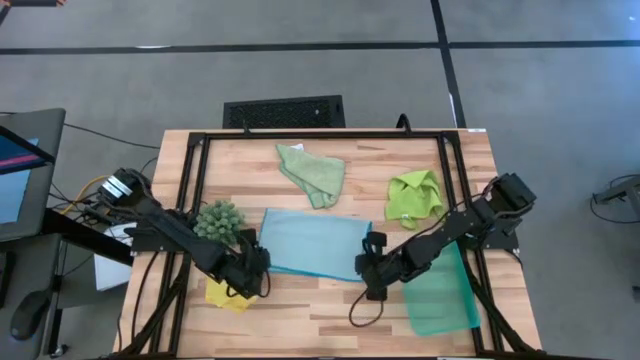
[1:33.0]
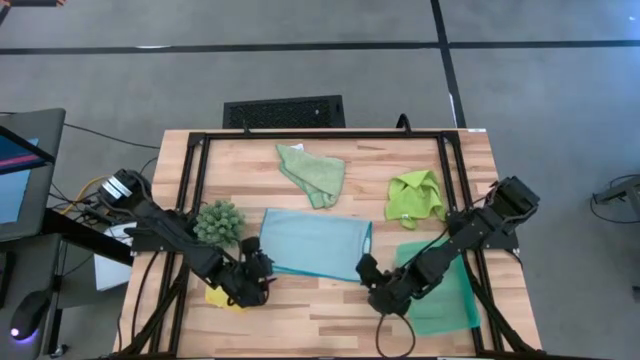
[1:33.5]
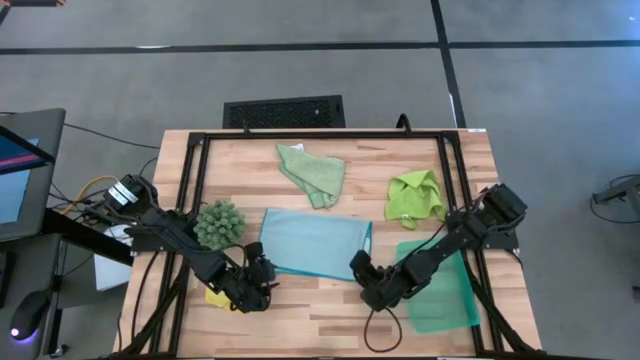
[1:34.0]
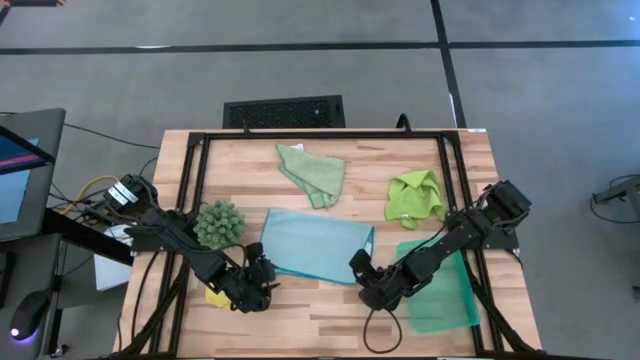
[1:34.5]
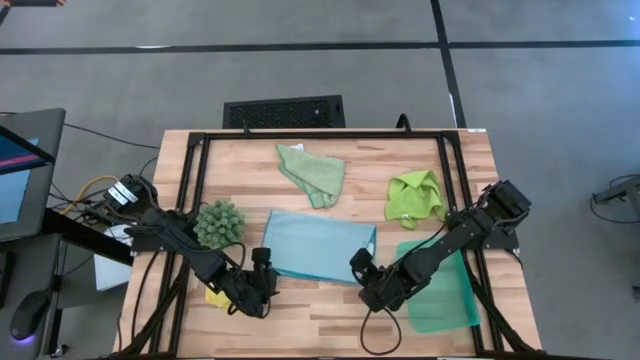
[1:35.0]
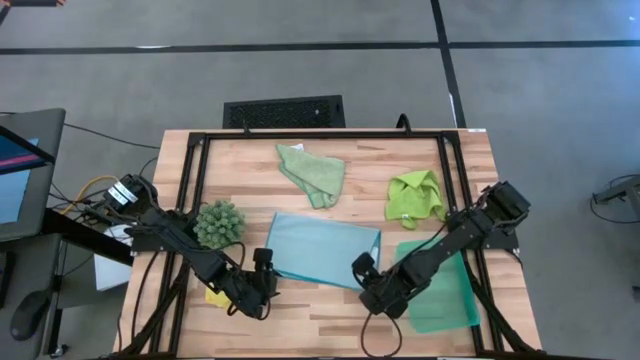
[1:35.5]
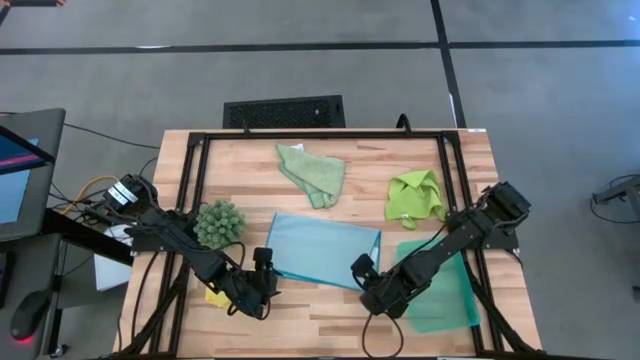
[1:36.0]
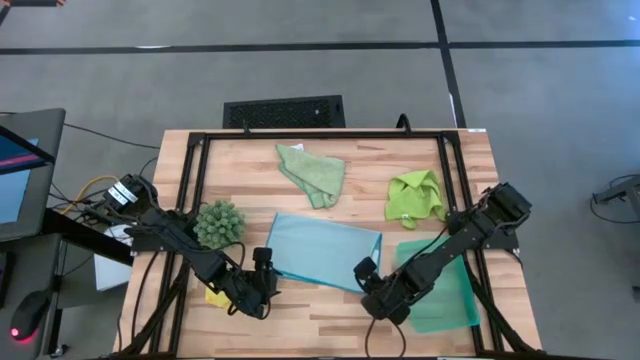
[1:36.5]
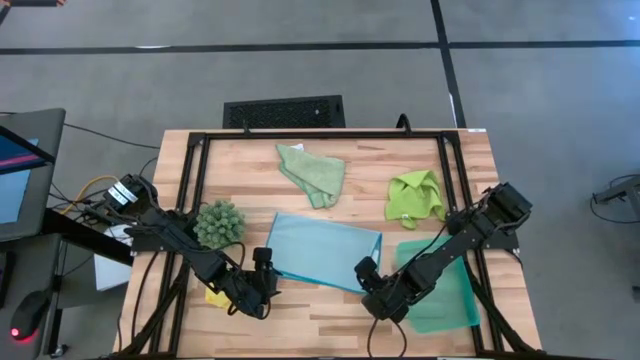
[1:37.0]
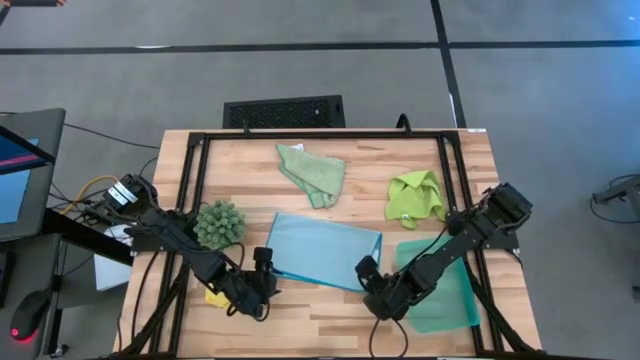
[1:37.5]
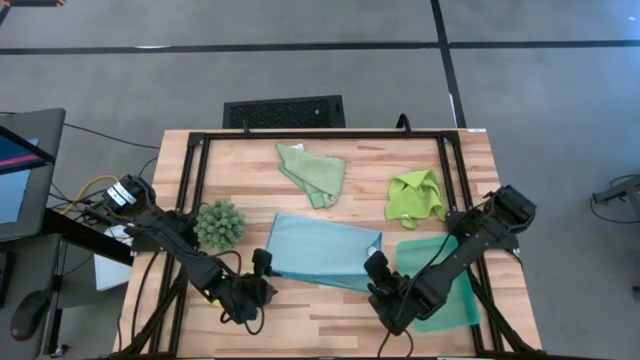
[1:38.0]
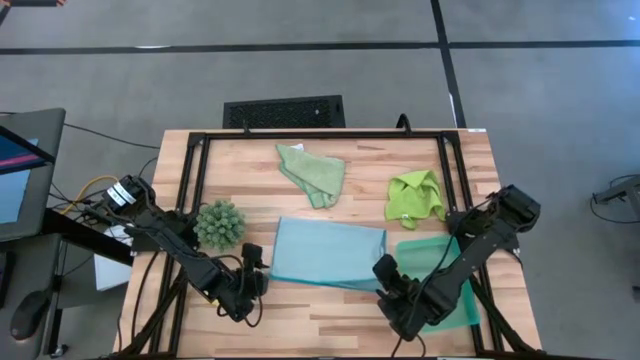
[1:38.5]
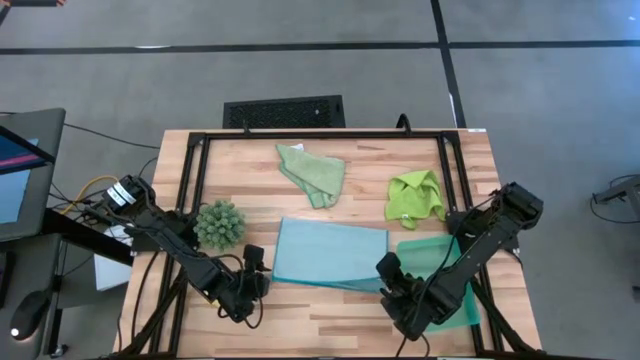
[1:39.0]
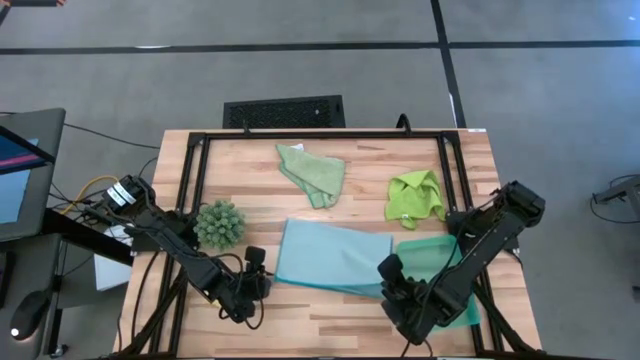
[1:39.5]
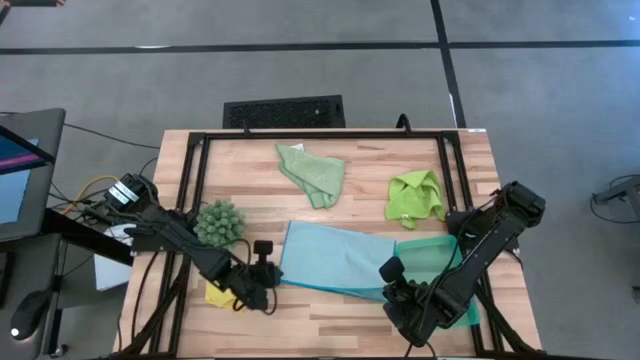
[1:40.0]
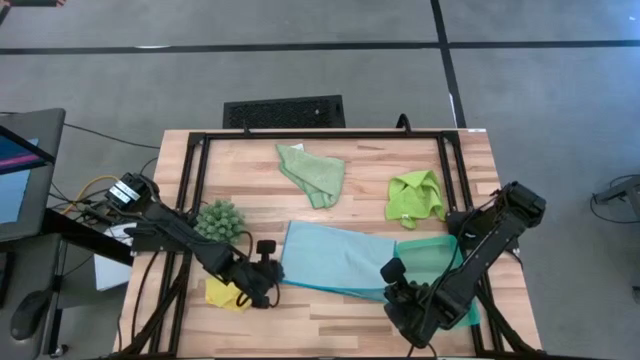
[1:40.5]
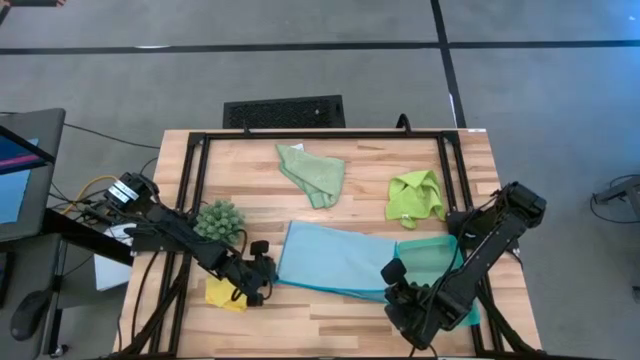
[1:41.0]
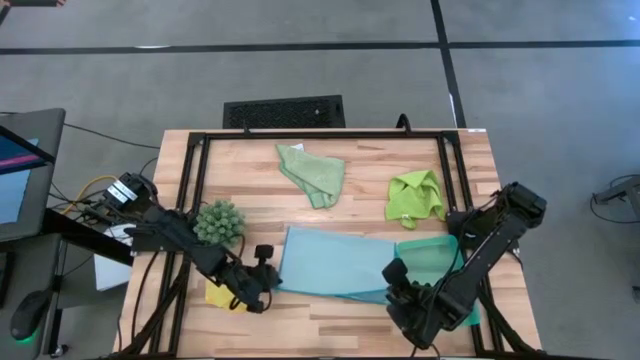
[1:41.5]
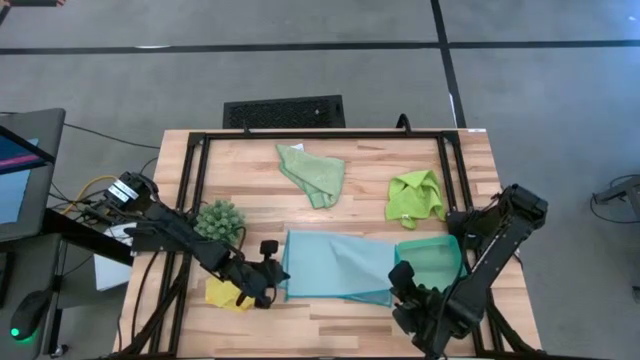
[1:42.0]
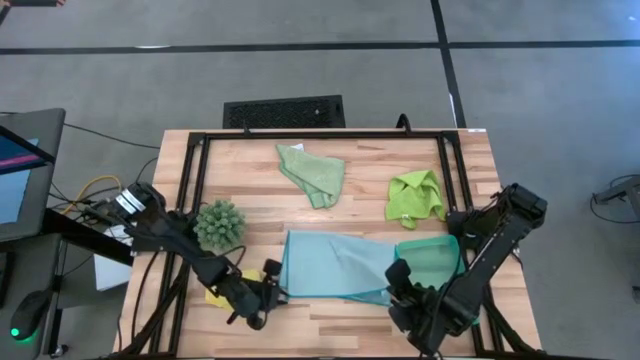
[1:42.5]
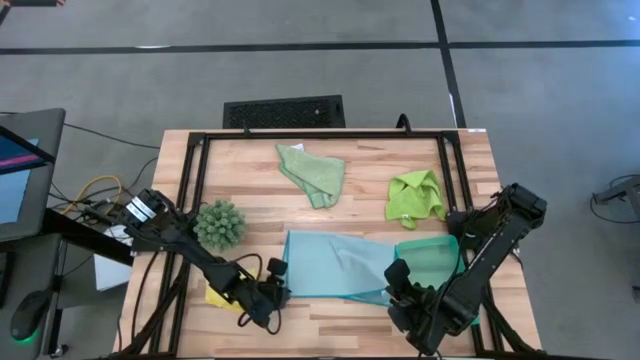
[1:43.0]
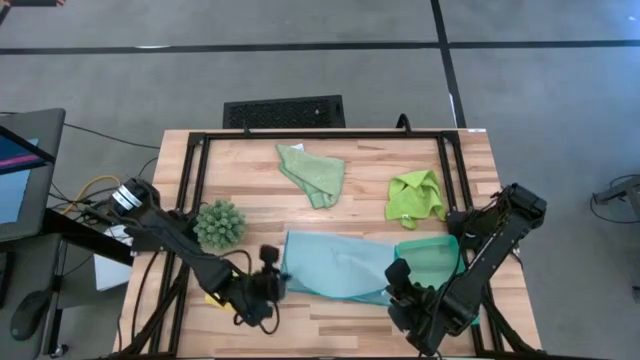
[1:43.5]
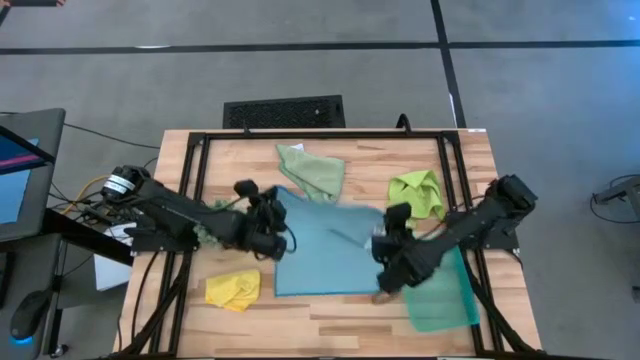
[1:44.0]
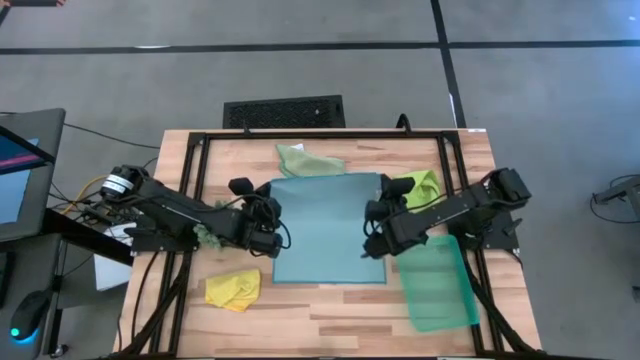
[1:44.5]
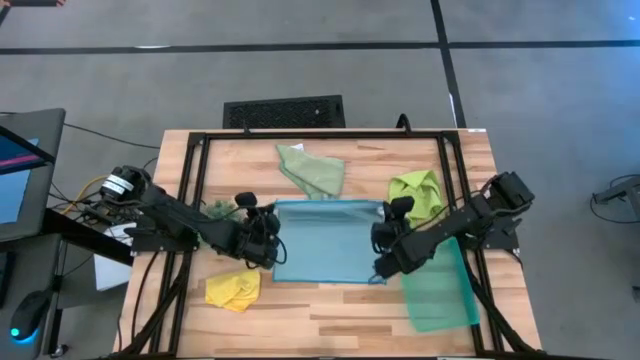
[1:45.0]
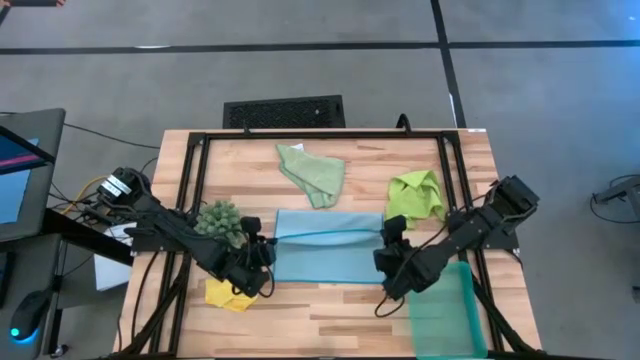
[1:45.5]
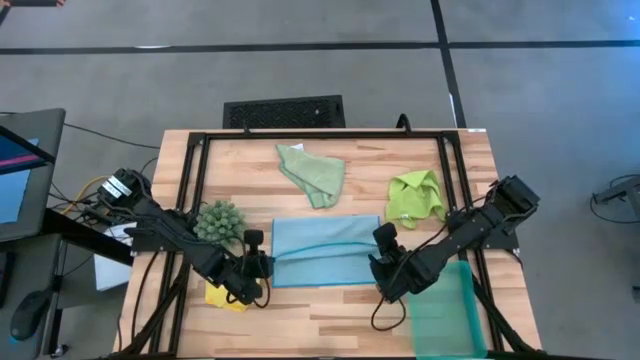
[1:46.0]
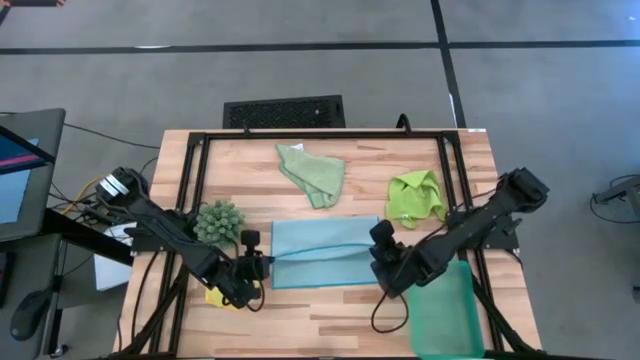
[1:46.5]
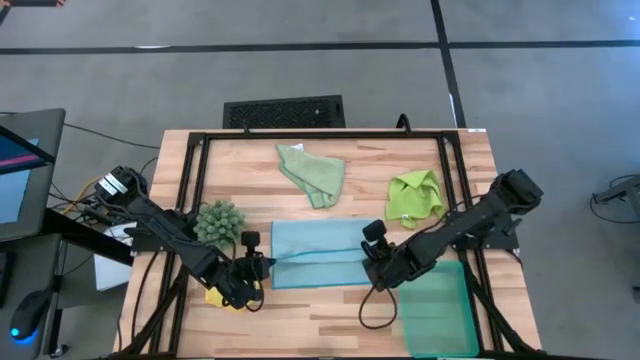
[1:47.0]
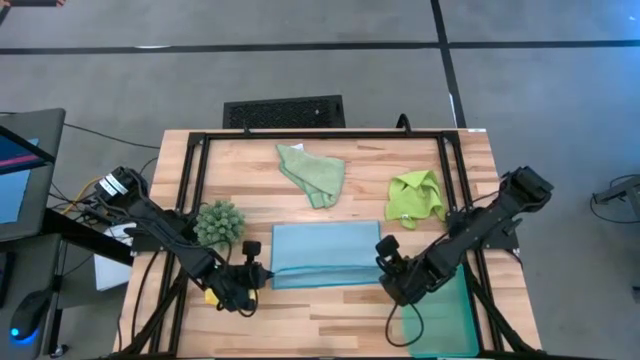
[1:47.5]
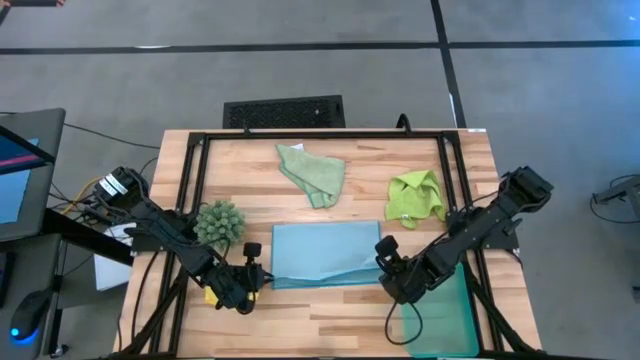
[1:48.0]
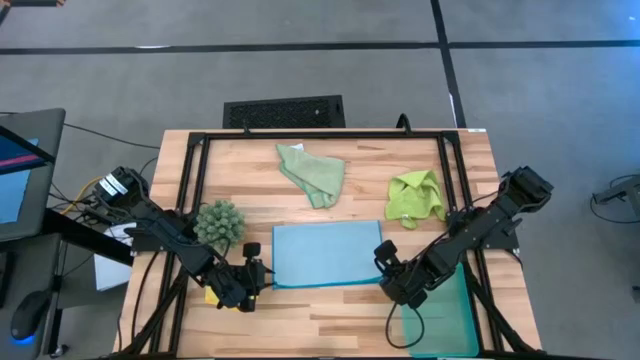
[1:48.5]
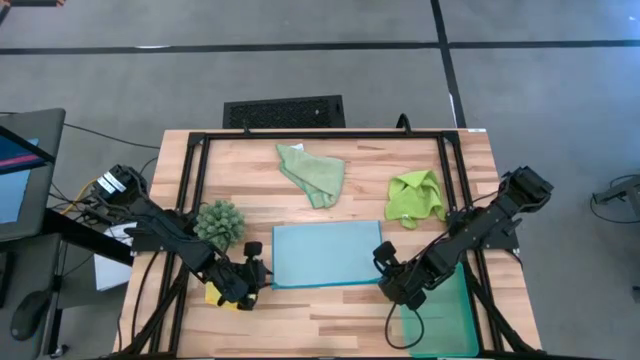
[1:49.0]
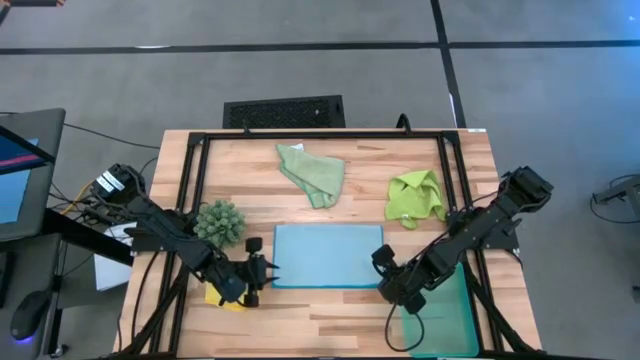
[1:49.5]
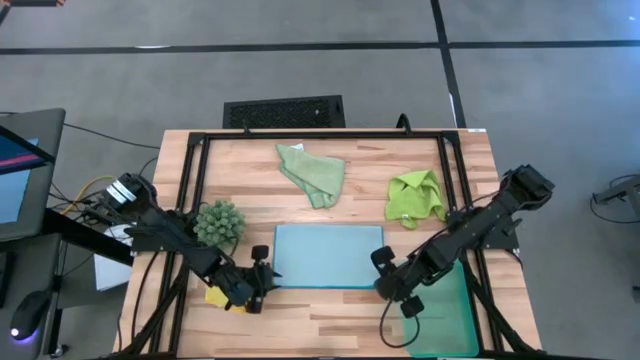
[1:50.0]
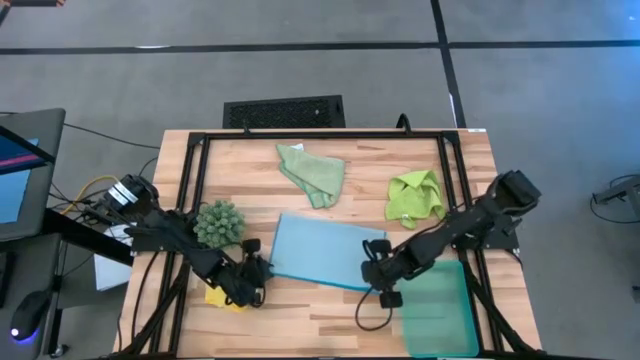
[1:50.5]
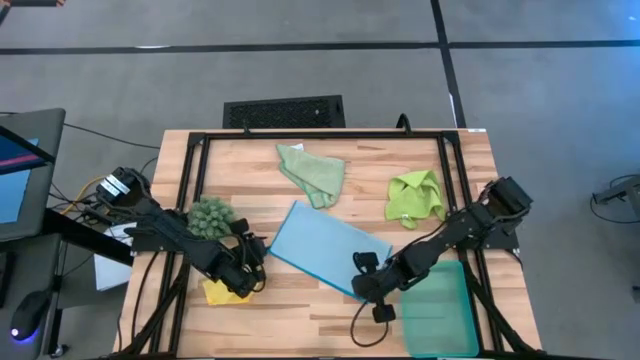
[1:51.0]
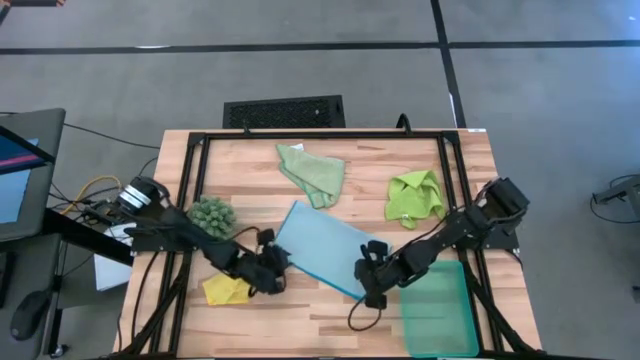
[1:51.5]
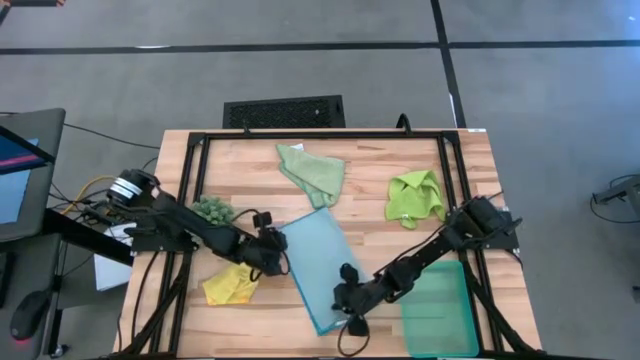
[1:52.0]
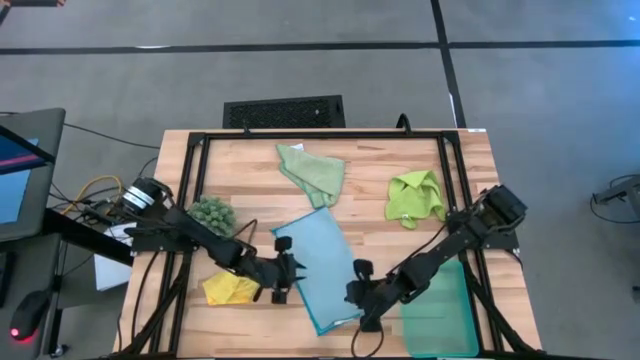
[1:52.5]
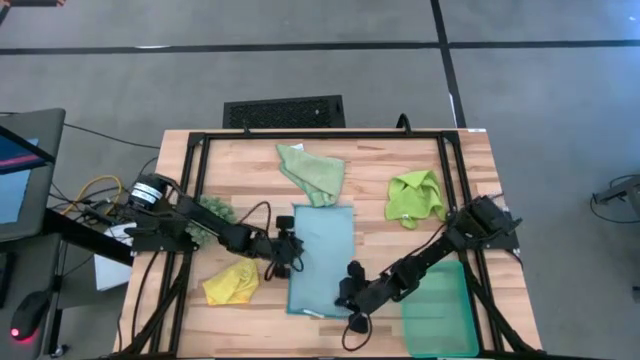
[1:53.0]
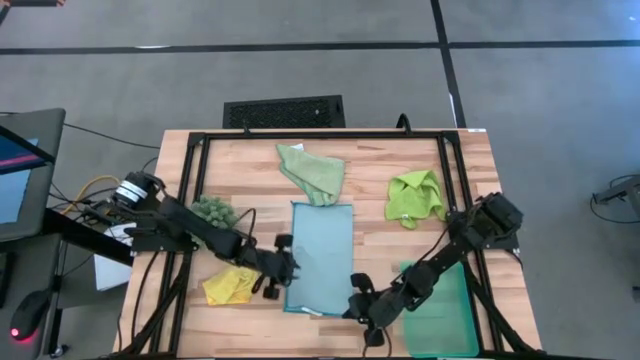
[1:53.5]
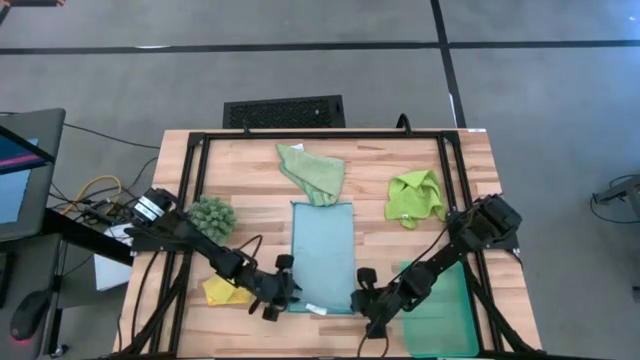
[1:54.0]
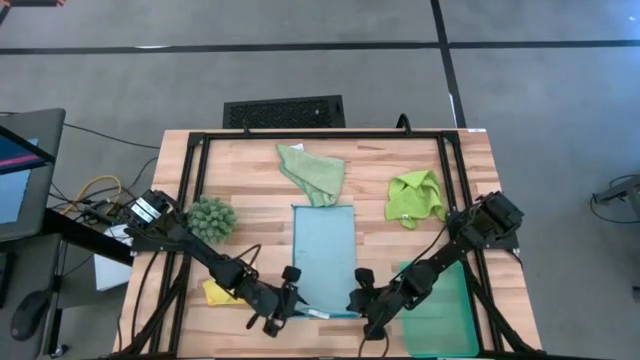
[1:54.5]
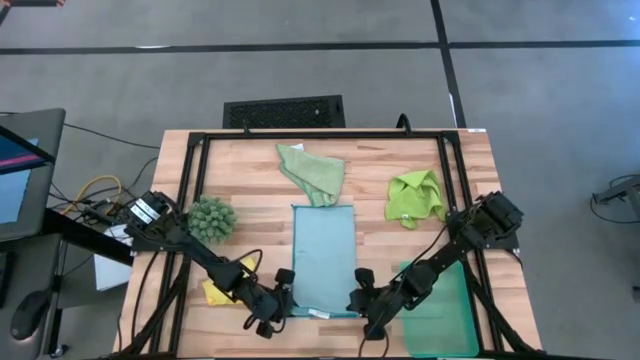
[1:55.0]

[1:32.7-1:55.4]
Task: Fold microfiber towels
Fold the blue microfiber cloth
